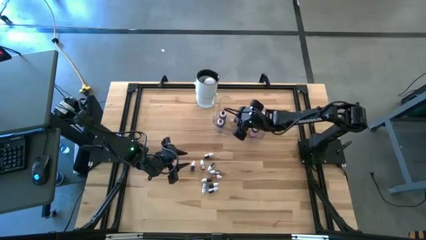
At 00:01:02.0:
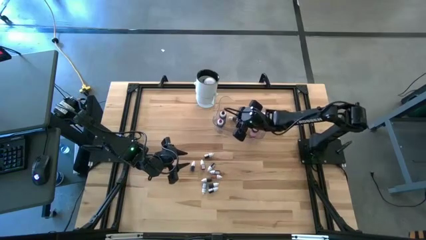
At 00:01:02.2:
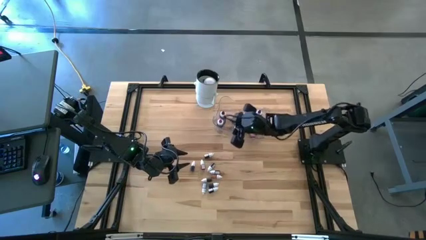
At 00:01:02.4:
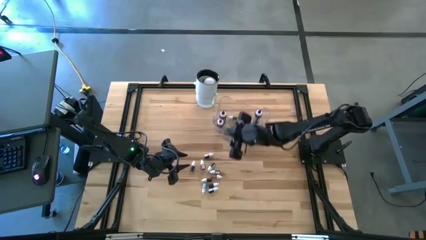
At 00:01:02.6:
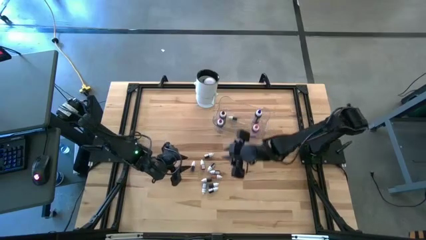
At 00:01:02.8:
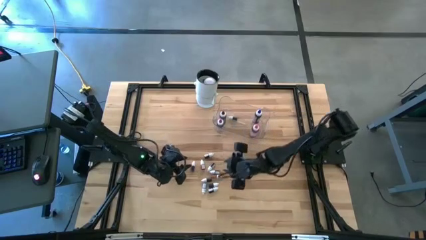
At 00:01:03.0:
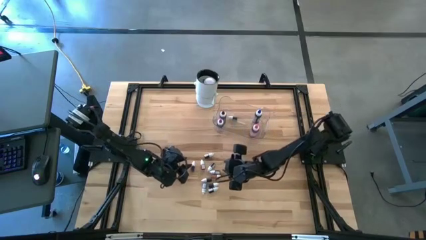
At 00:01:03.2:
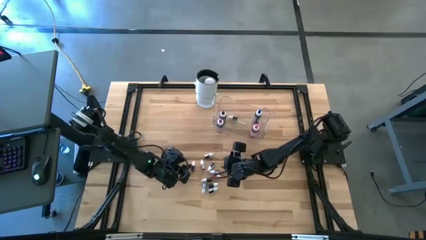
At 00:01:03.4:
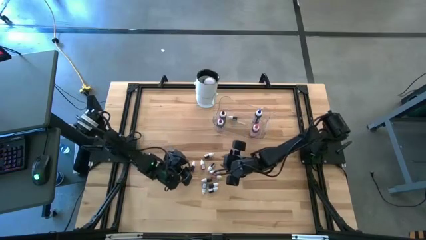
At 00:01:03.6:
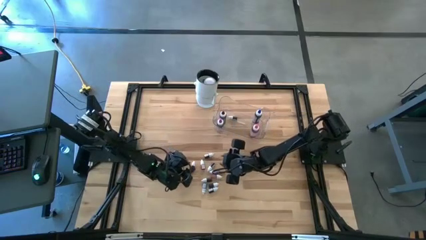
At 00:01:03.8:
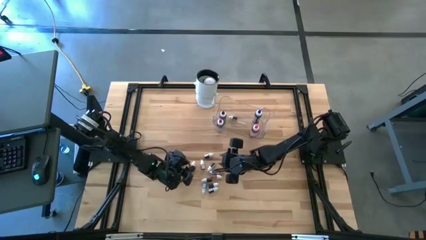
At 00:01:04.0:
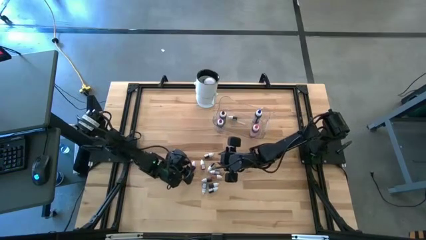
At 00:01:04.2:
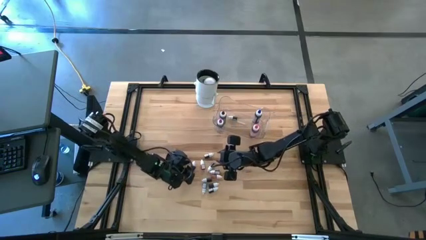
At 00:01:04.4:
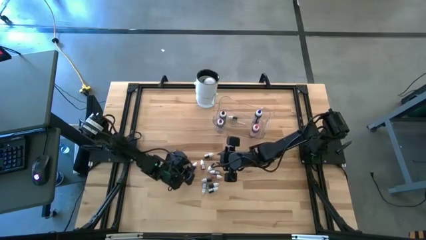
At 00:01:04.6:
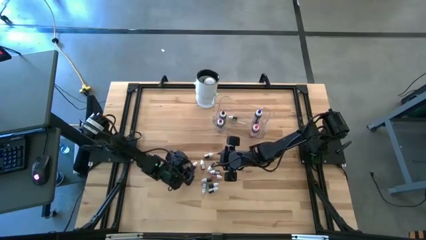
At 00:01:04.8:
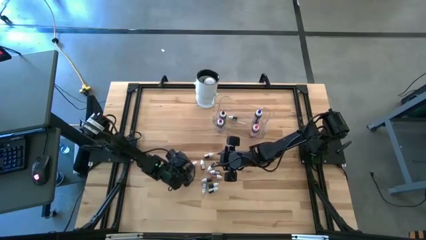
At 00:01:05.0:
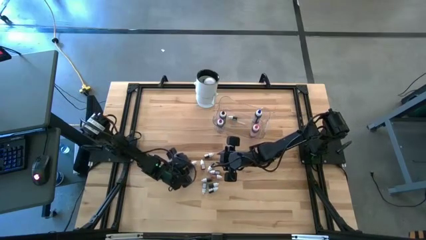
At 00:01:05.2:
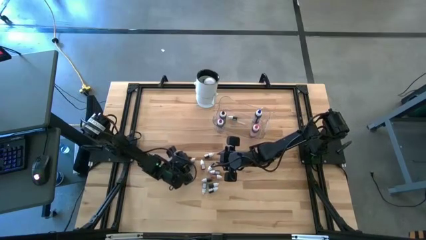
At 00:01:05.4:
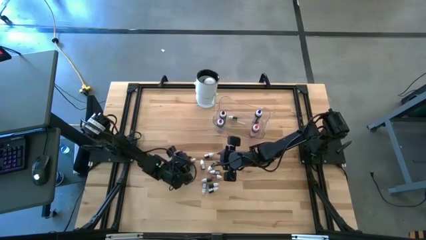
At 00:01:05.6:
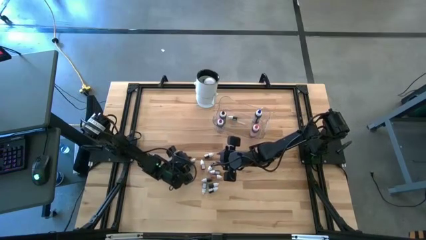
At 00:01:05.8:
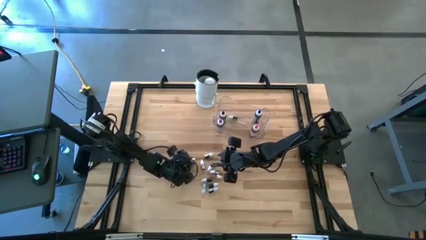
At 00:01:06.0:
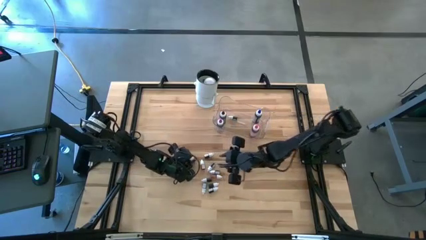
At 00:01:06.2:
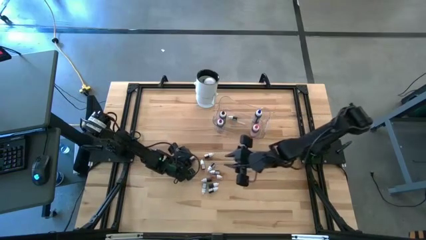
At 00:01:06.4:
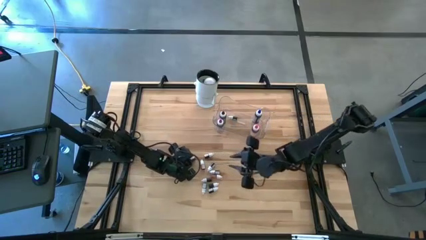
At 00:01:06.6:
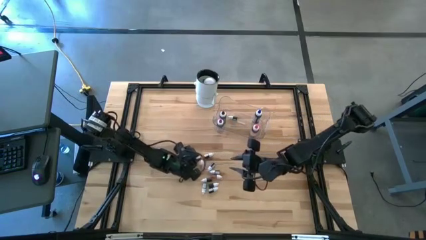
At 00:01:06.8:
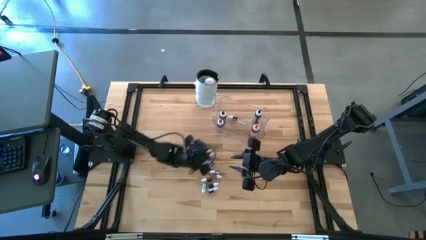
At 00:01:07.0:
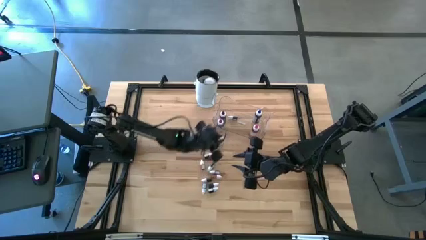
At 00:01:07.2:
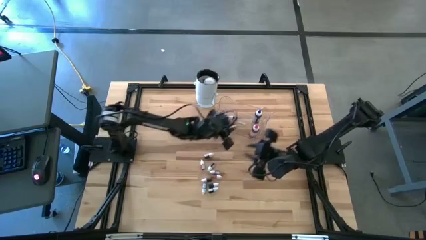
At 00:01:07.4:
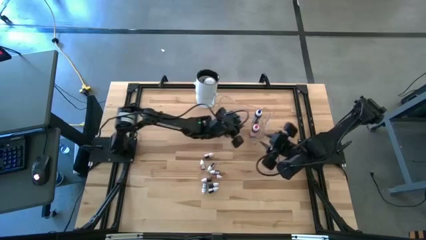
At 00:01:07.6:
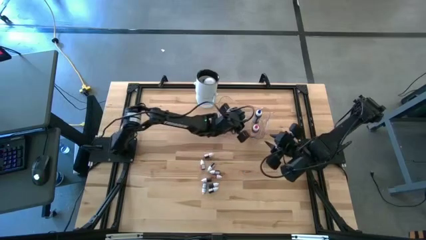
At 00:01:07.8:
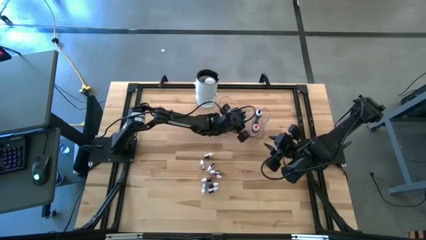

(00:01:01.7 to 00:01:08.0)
Task: Pick & Place food coloring
Put the small purple food coloring bottle into the transparent container

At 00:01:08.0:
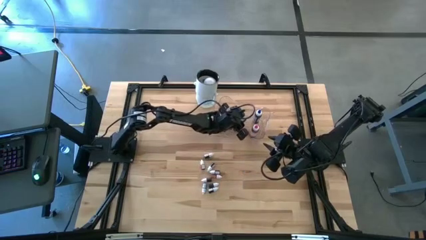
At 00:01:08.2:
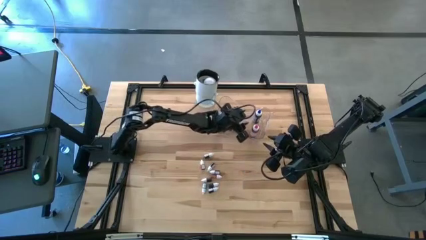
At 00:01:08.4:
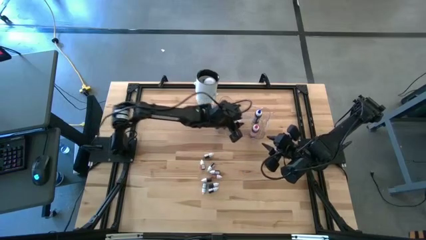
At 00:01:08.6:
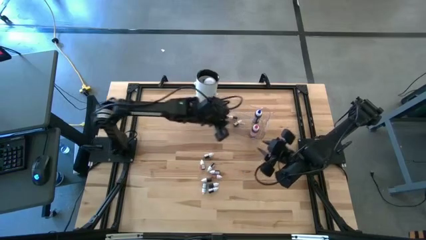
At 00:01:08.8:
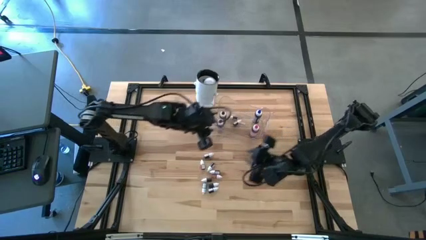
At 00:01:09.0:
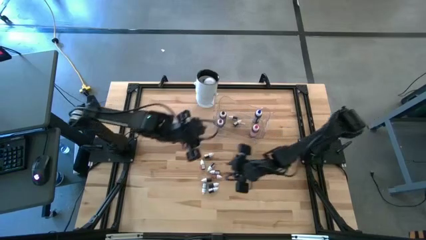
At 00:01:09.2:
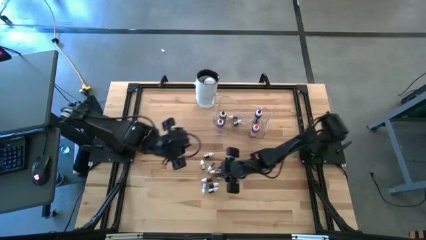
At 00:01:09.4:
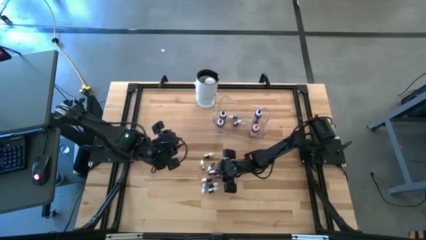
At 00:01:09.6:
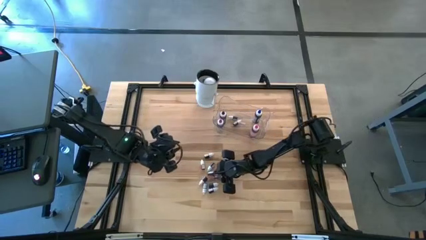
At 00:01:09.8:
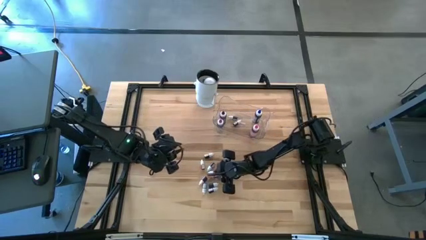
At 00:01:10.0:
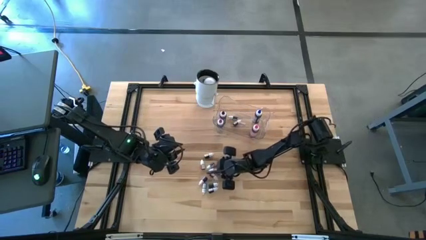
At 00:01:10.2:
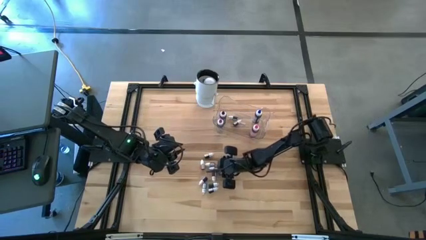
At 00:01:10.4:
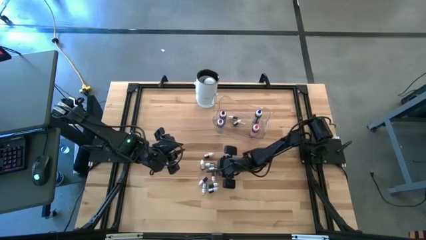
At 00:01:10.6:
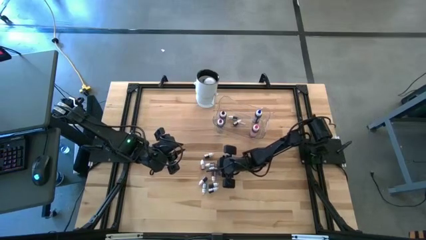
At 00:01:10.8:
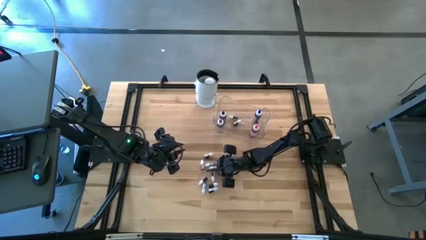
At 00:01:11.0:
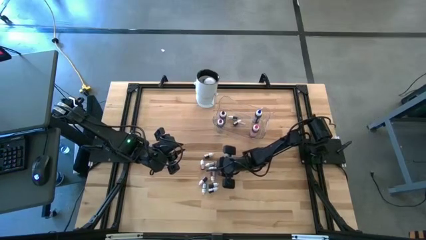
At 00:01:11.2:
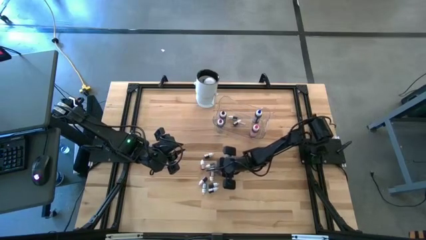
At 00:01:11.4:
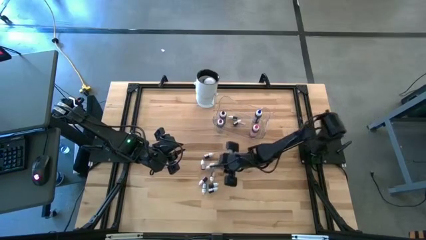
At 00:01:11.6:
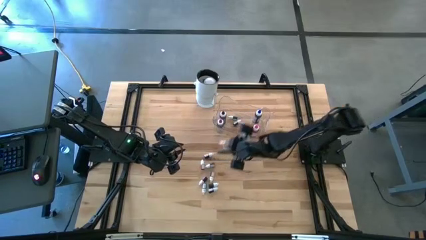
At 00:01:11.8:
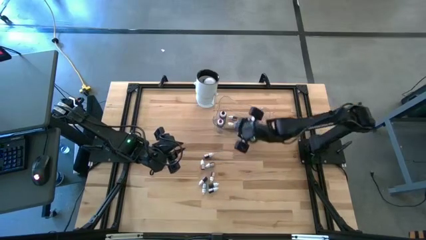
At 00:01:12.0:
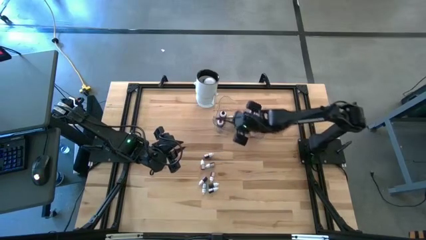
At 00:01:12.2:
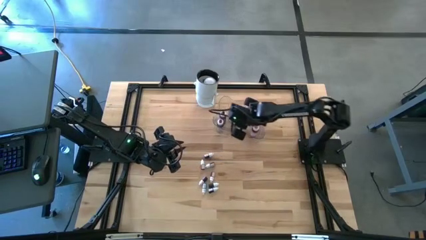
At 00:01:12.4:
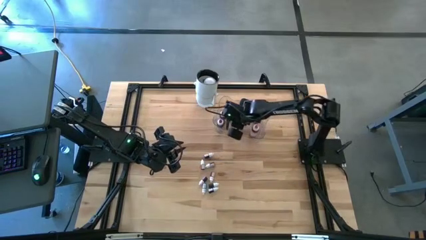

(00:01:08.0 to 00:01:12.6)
Put the small red food coloring bottle into the transparent container

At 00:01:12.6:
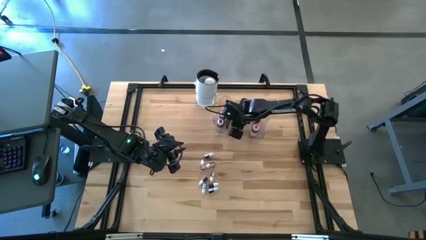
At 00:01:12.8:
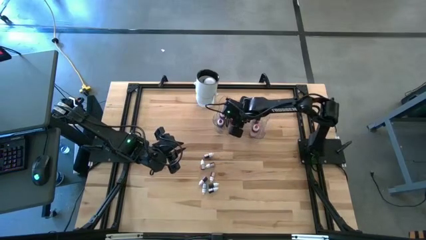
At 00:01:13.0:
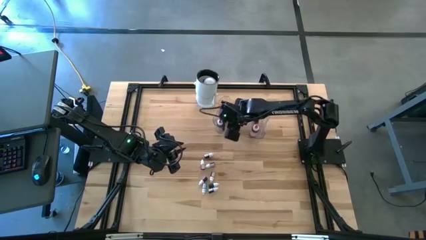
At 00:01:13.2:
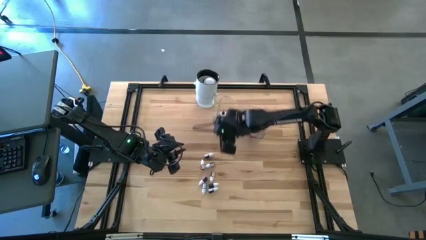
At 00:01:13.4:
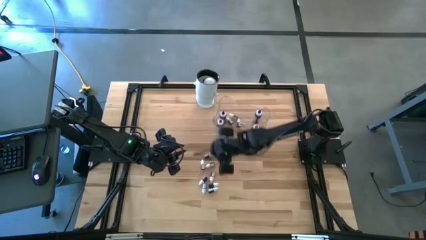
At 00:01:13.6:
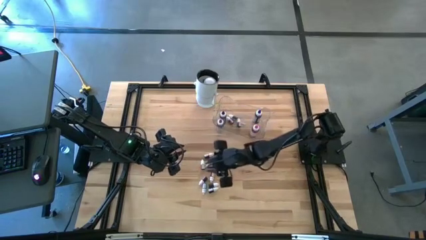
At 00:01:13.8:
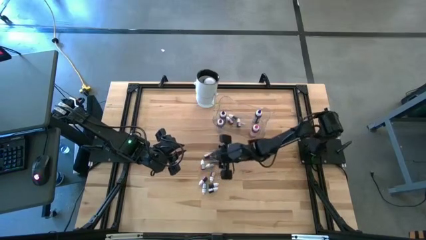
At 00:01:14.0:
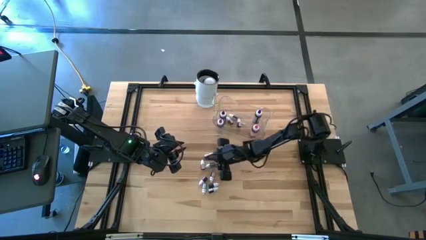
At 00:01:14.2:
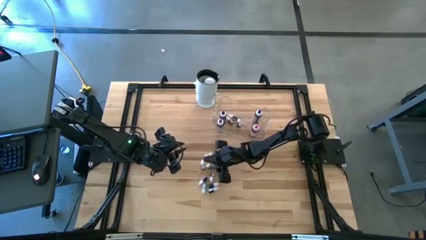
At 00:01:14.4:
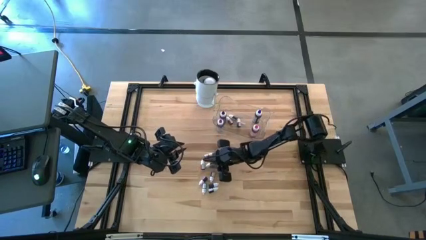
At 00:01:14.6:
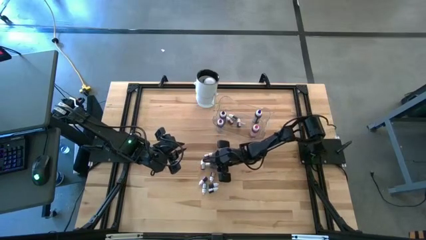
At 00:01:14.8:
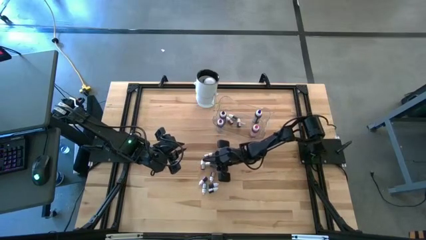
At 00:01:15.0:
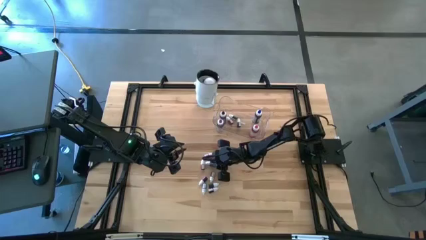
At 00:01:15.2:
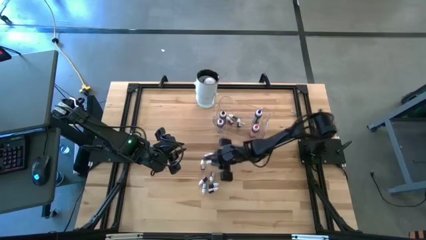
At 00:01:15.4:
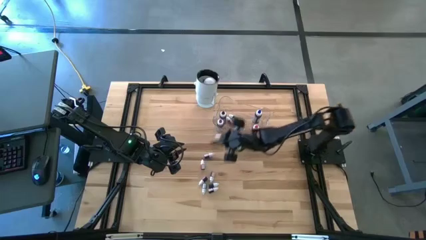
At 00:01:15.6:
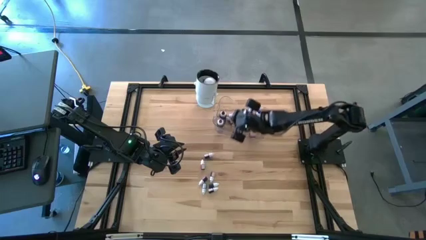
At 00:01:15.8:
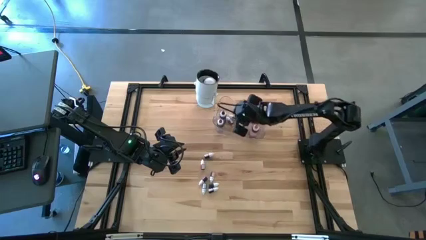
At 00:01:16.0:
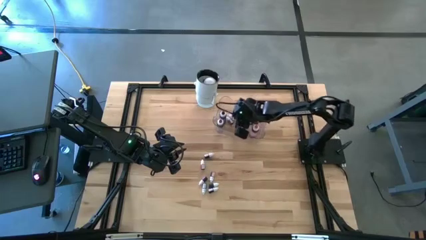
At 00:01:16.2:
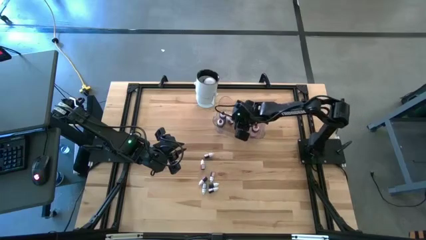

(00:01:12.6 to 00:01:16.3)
Put the small black food coloring bottle into the transparent container

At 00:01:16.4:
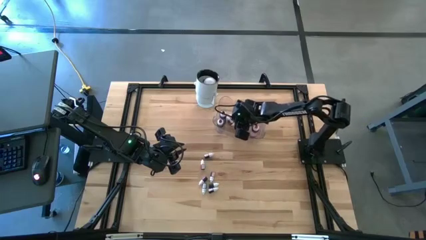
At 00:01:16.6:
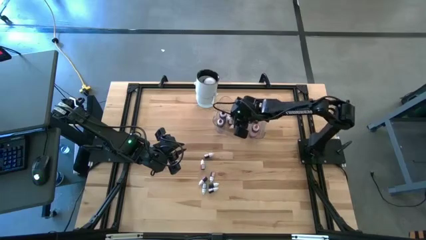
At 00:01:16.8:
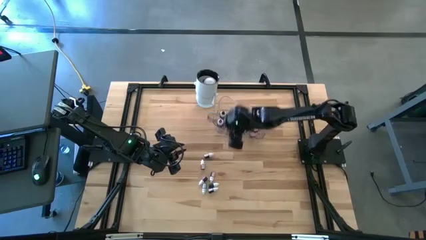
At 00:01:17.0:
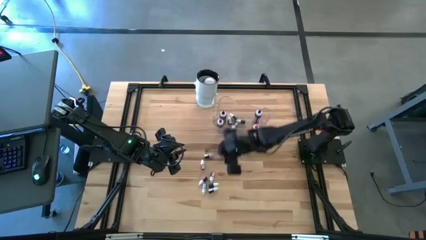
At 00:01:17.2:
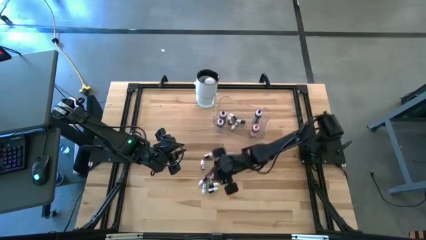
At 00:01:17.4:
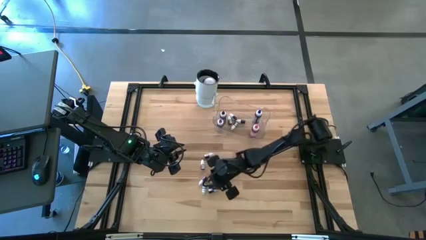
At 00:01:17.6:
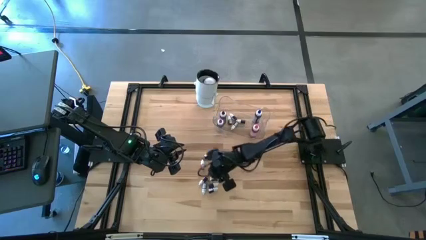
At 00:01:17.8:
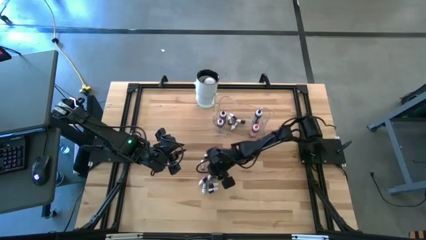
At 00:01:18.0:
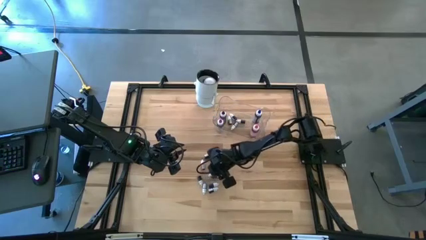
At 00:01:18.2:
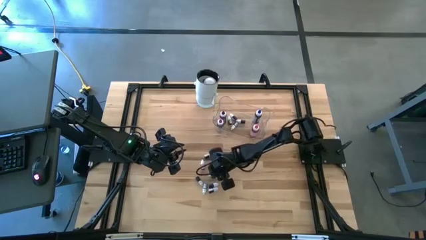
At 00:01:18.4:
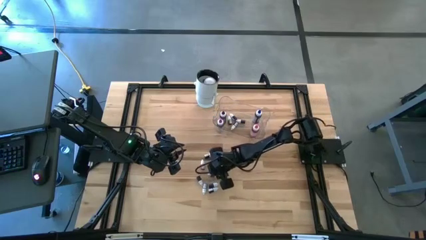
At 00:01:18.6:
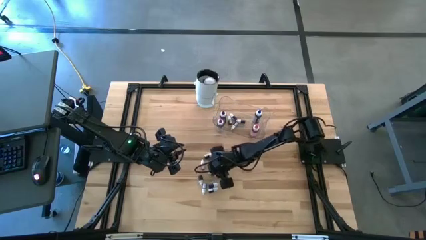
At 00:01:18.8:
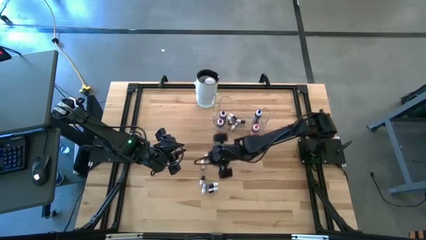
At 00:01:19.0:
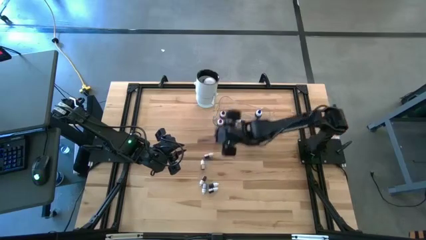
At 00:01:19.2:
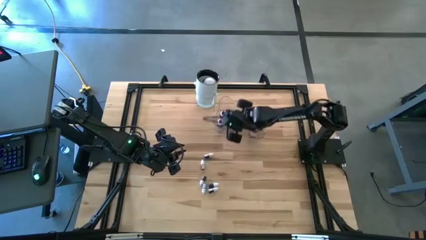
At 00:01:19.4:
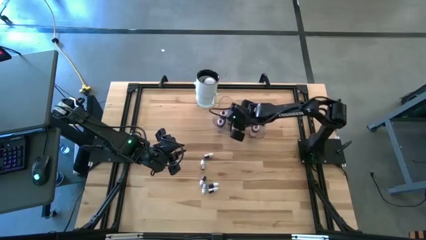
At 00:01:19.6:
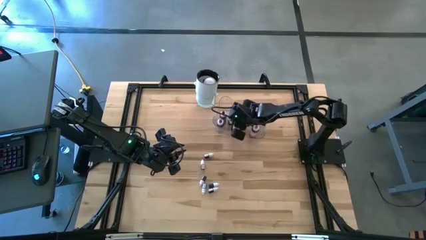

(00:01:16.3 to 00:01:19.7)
Put the small orange food coloring bottle into the transparent container
